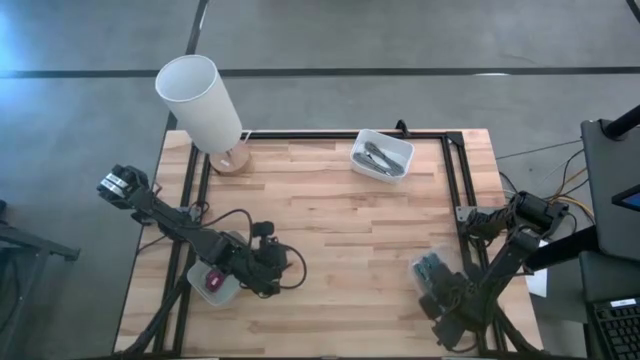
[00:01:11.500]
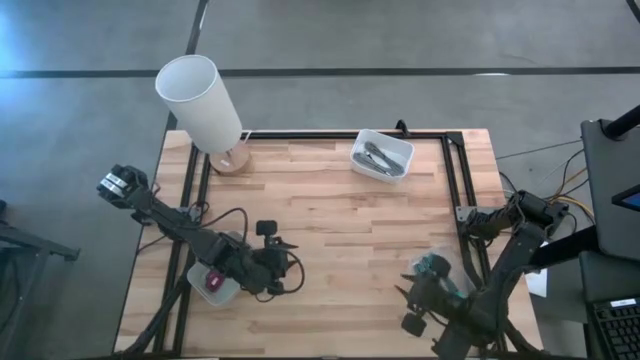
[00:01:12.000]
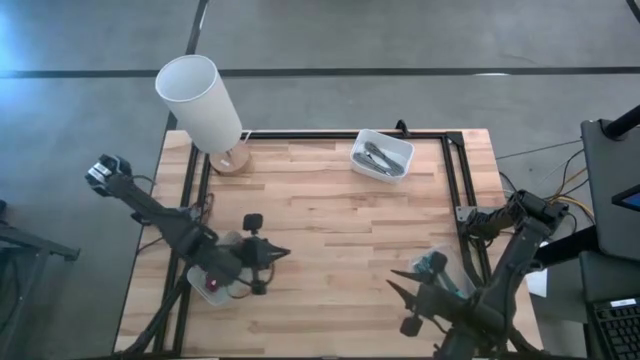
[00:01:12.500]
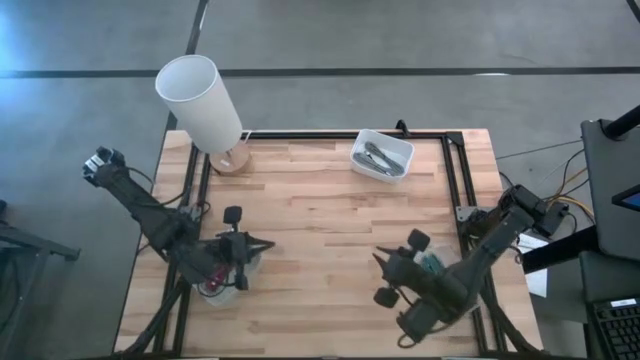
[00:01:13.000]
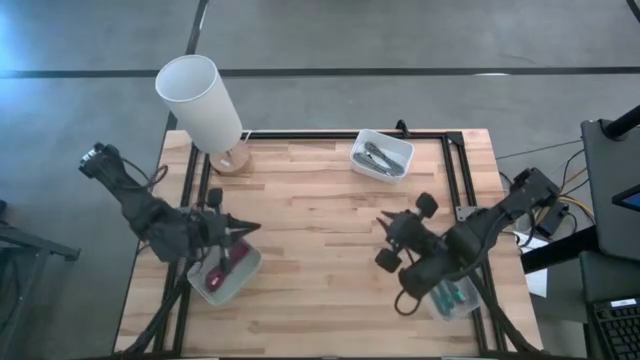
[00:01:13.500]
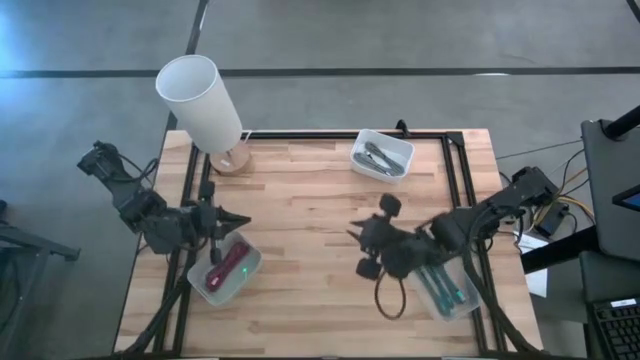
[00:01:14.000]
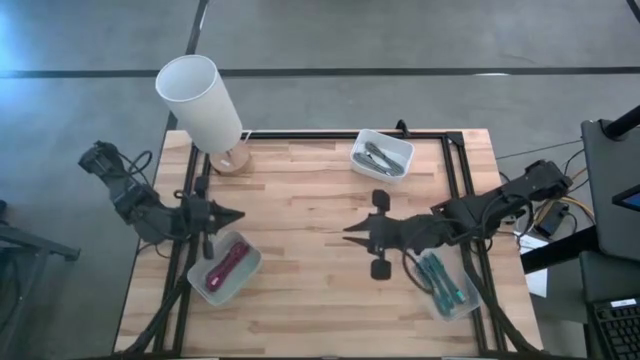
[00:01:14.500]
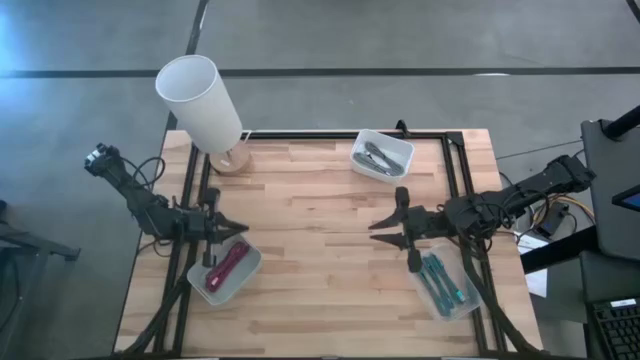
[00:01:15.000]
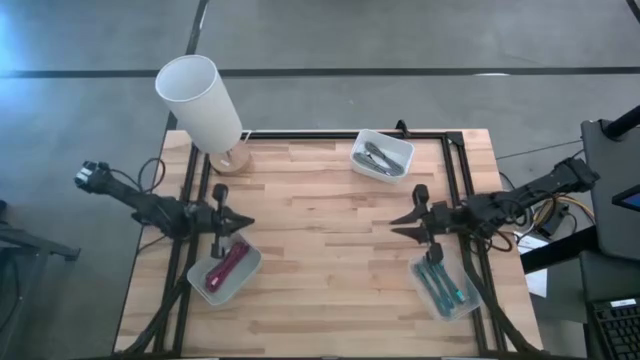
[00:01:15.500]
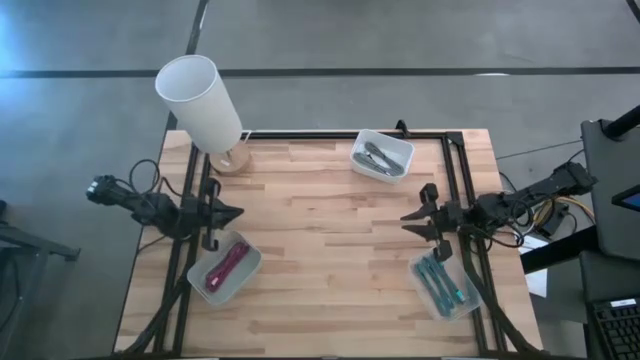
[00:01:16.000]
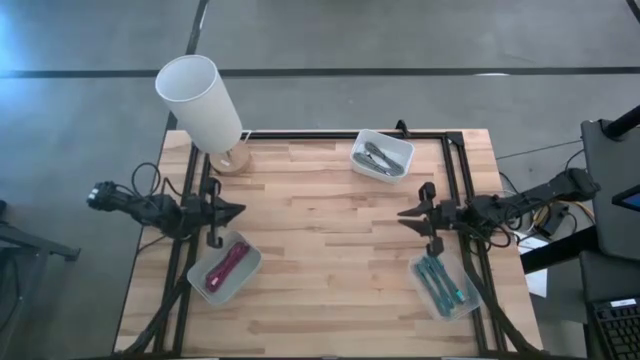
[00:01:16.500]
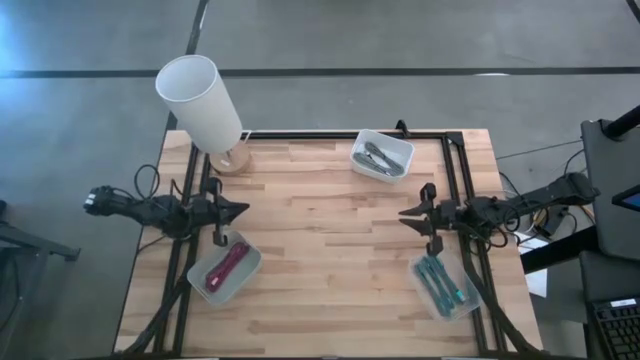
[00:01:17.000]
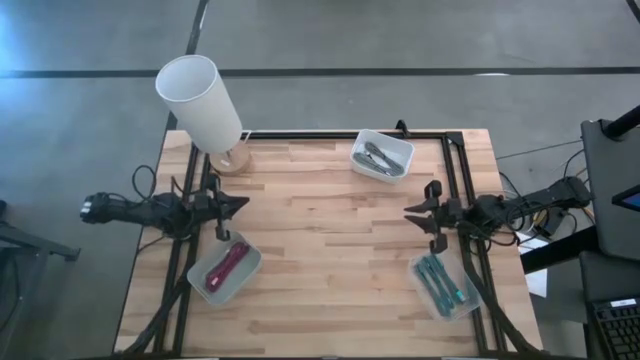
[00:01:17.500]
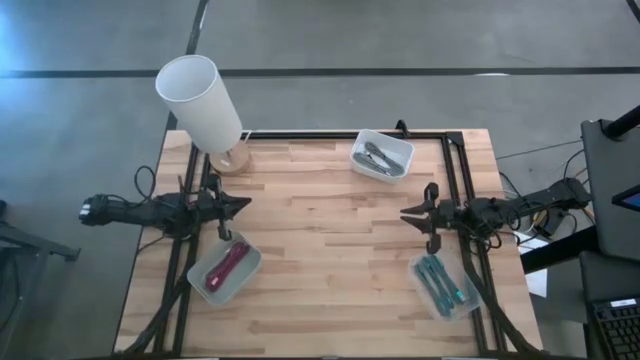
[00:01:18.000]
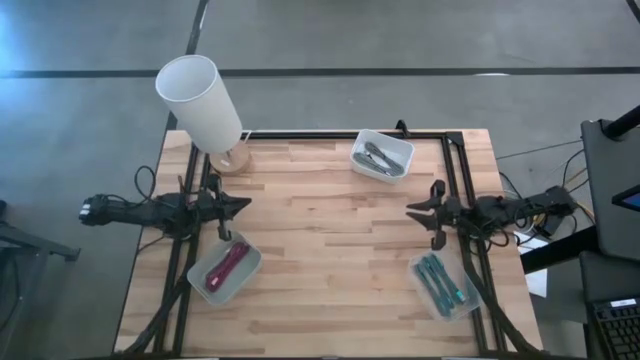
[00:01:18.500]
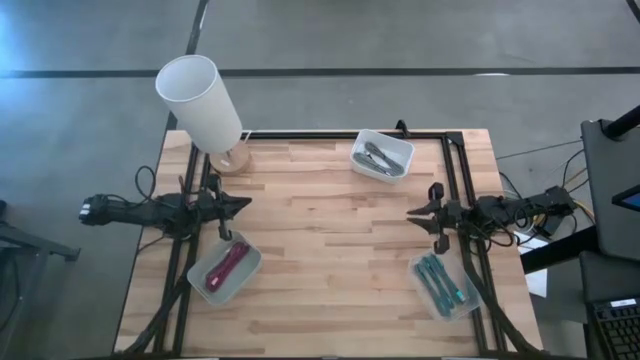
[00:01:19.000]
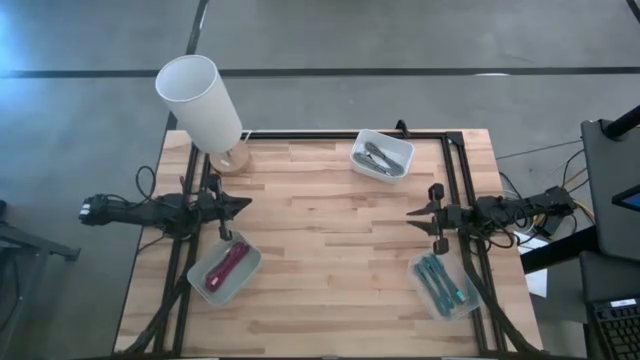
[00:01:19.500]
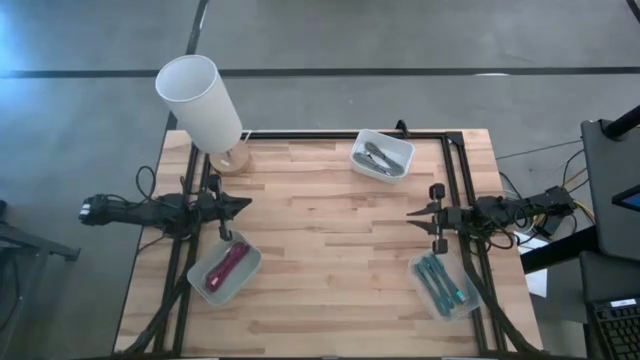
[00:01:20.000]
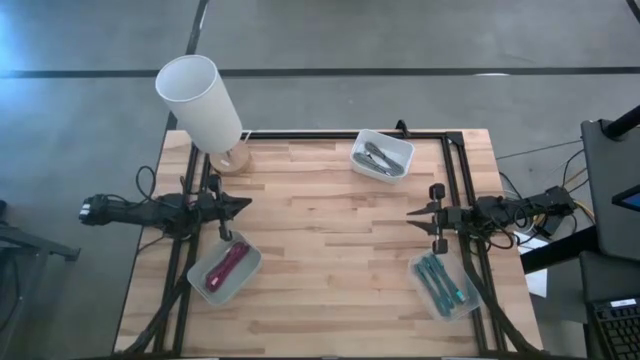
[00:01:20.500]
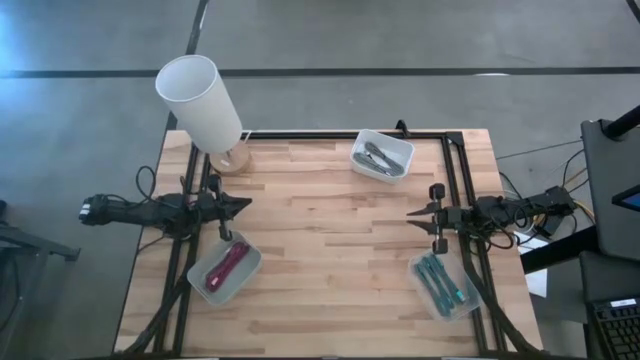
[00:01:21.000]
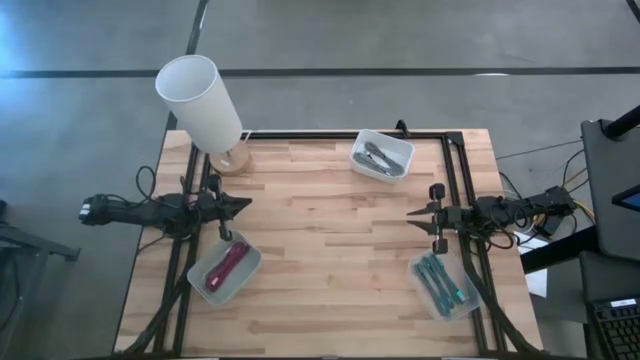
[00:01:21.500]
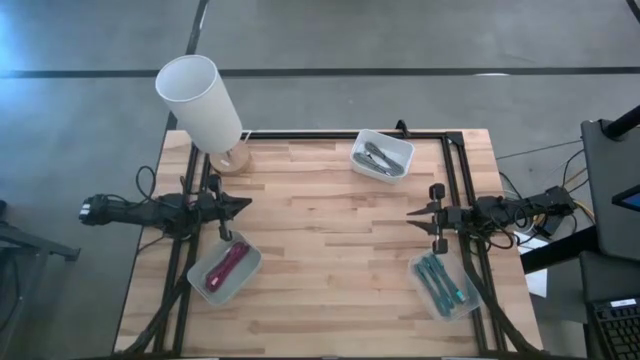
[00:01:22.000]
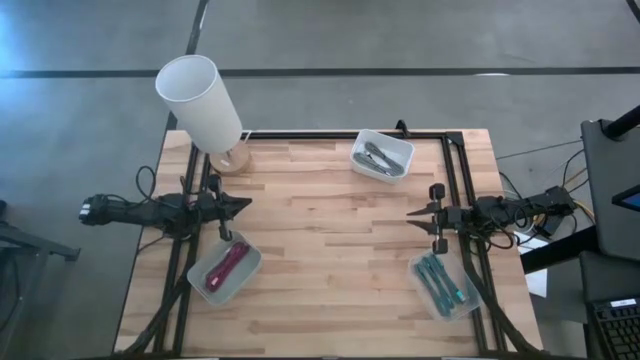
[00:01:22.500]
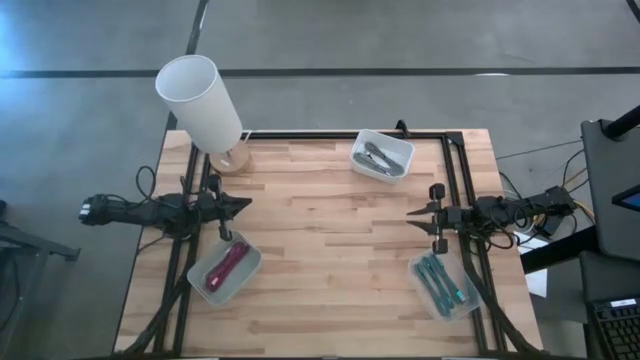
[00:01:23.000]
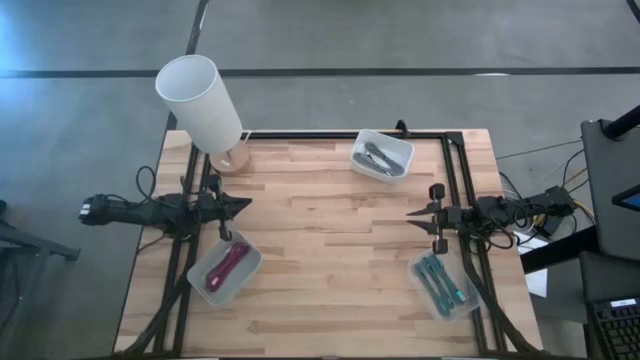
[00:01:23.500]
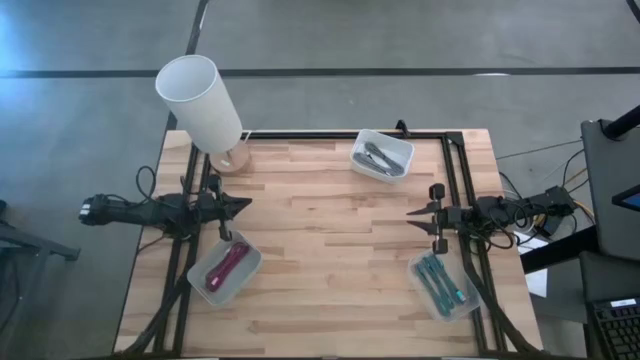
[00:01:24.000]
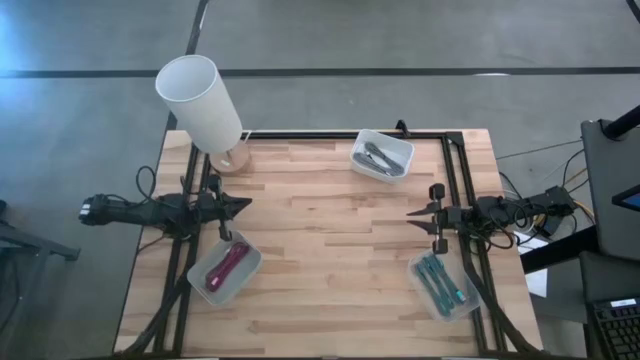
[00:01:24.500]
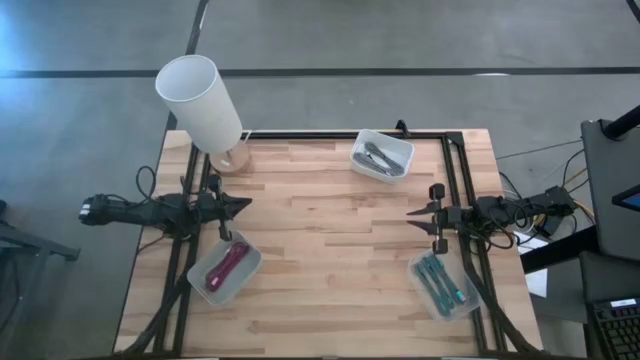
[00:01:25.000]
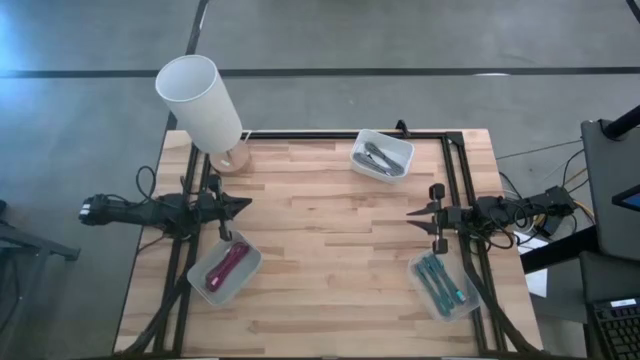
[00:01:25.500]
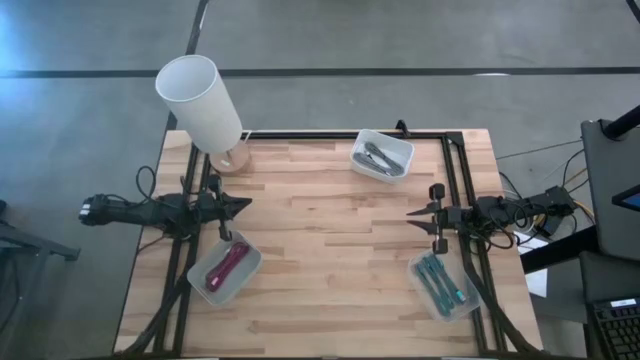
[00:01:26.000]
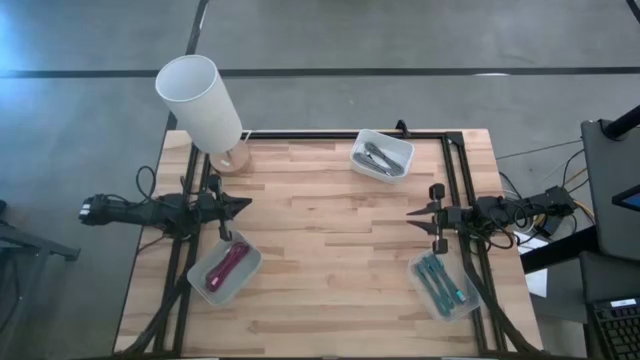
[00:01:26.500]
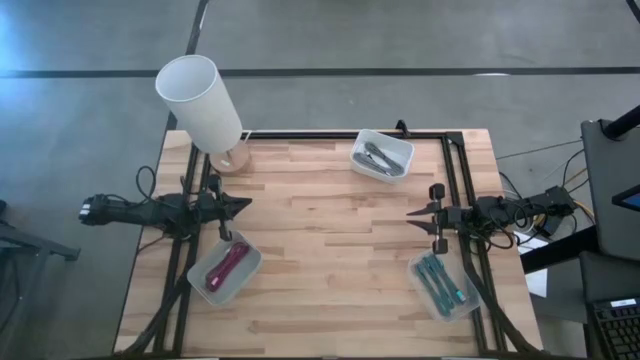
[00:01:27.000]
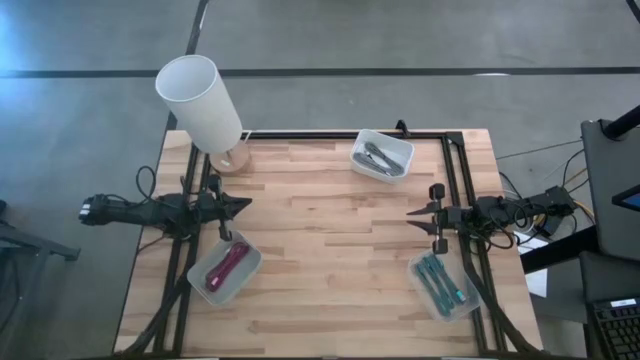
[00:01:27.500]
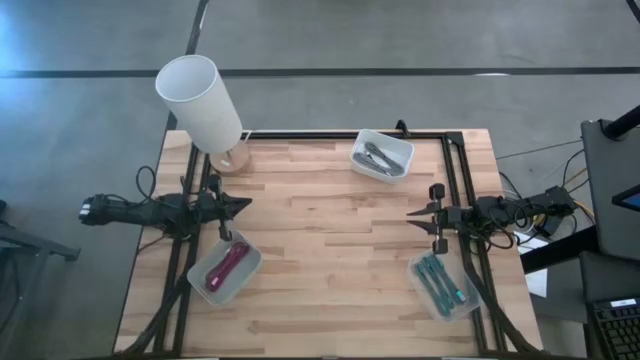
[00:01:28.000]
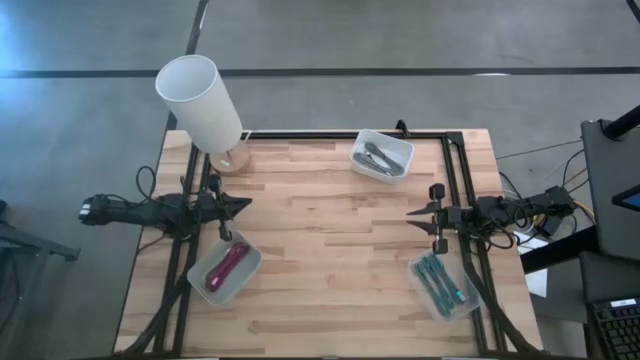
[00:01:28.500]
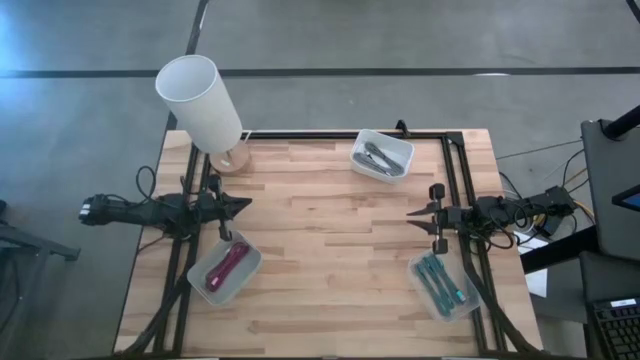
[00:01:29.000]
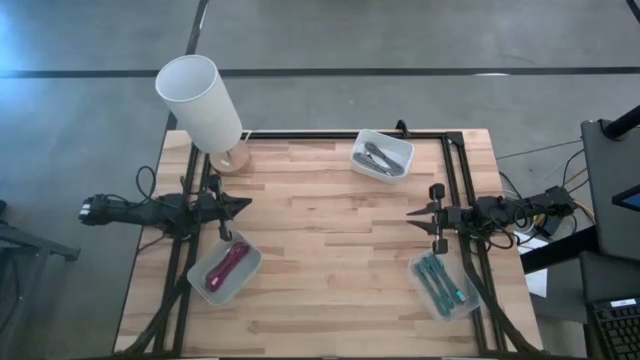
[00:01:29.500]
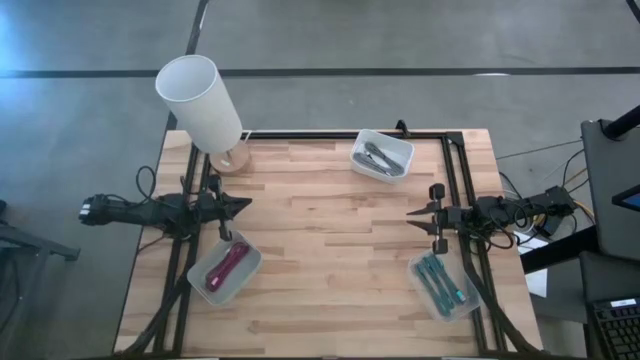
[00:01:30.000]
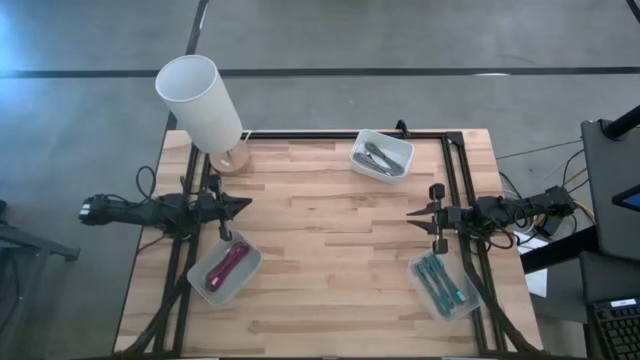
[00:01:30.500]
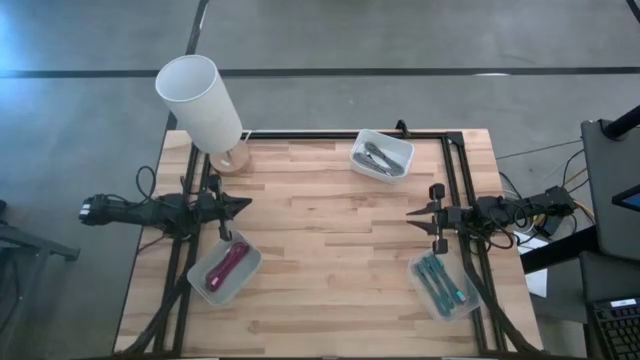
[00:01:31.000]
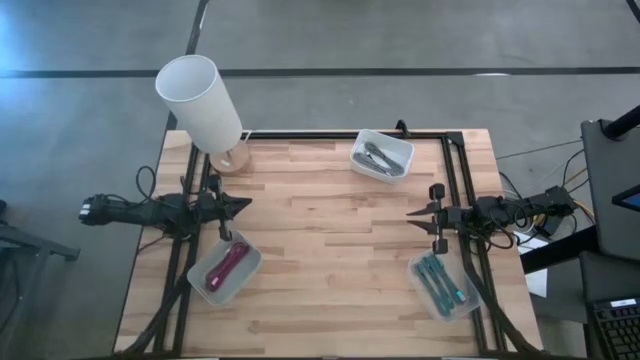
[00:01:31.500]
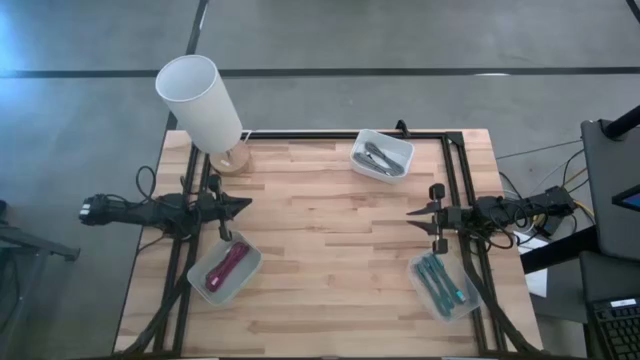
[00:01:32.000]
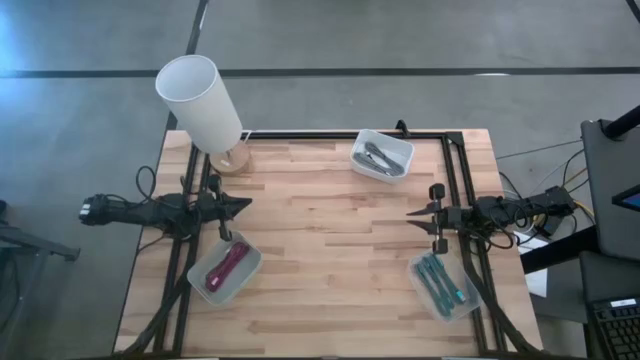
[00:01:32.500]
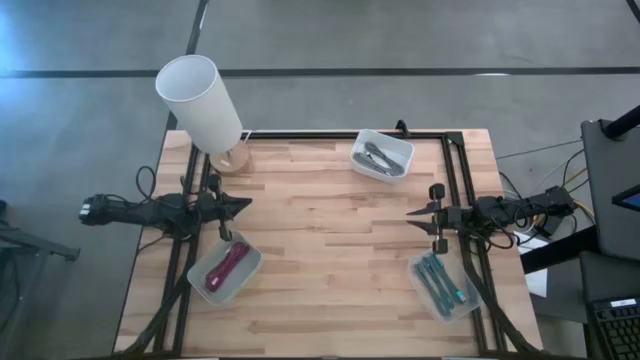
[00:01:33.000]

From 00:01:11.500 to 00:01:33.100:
Task: Pick & Place USB Port
Return to Home Position
